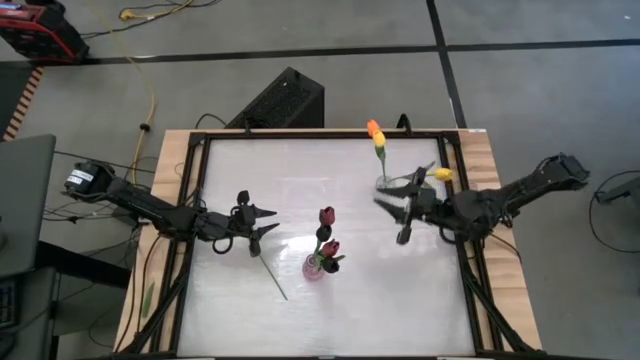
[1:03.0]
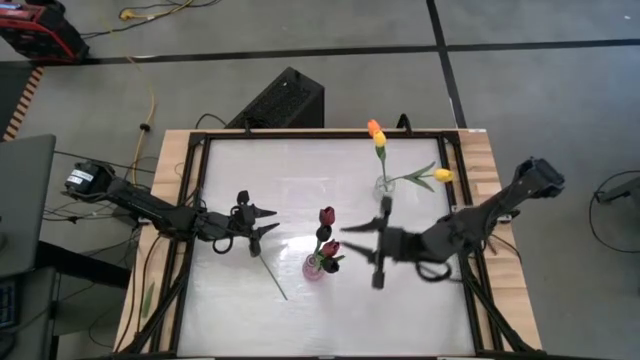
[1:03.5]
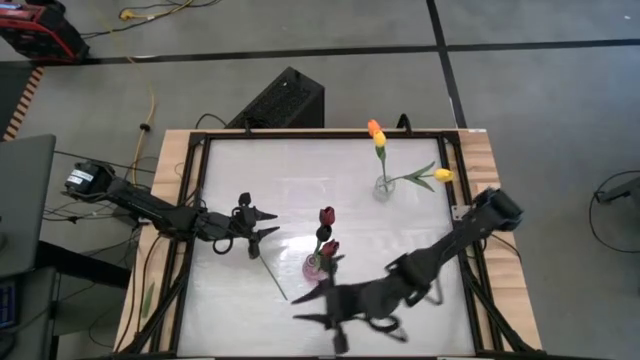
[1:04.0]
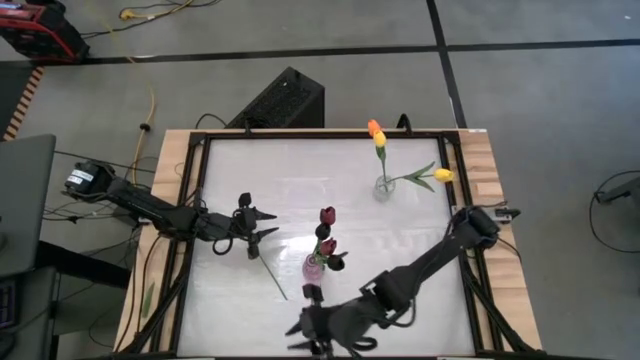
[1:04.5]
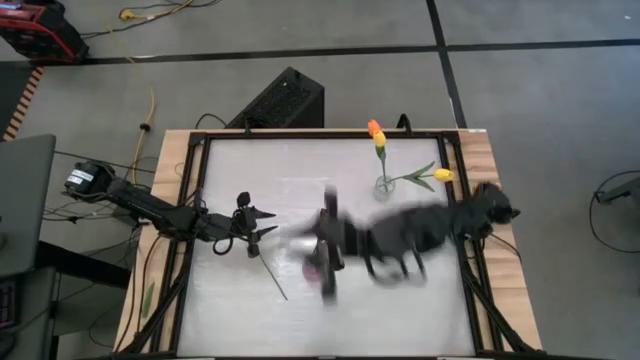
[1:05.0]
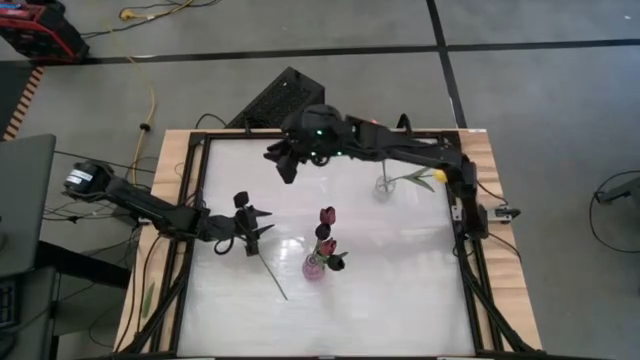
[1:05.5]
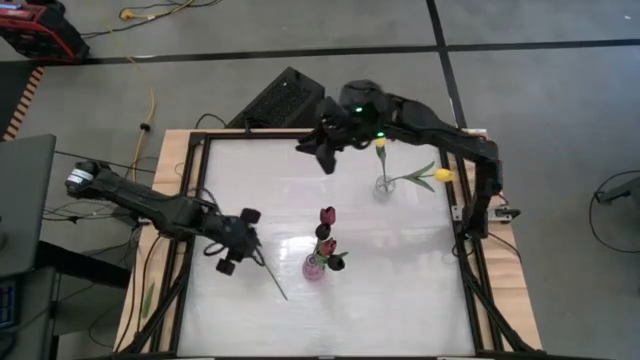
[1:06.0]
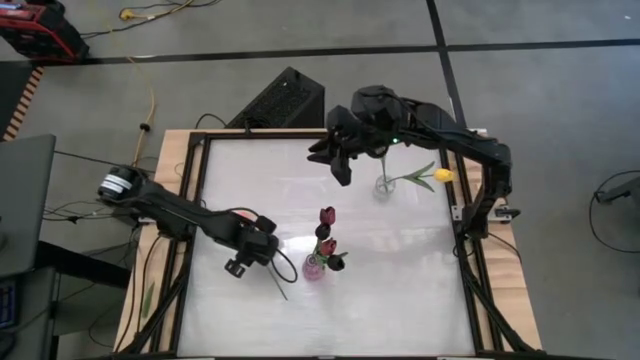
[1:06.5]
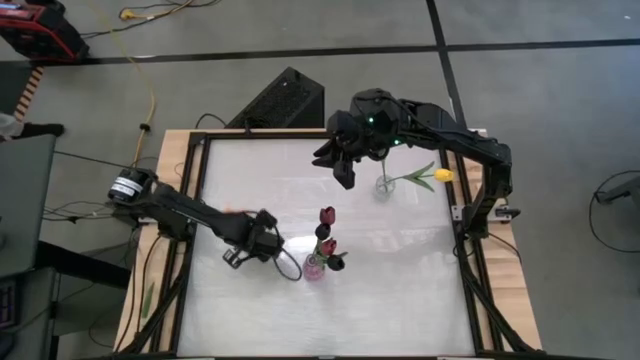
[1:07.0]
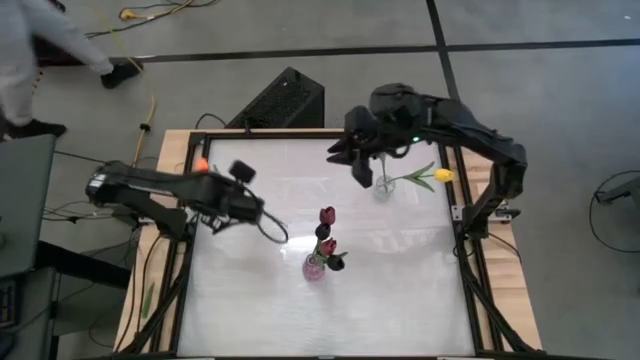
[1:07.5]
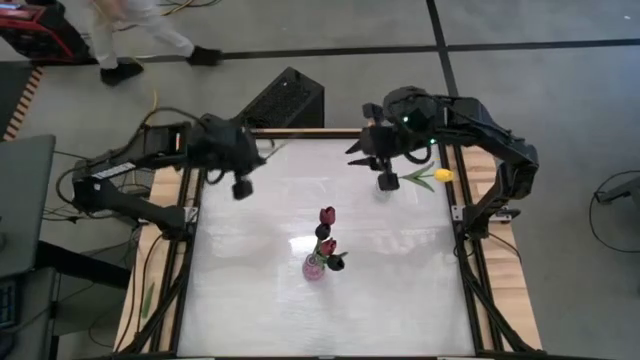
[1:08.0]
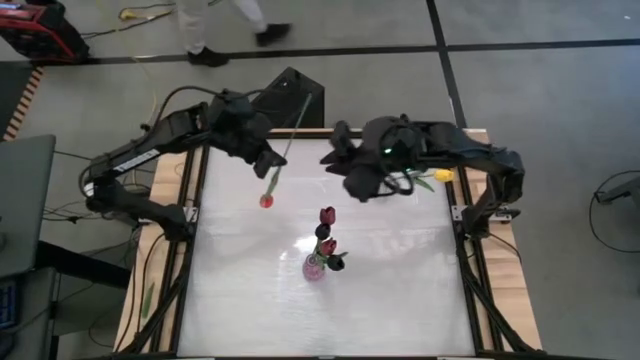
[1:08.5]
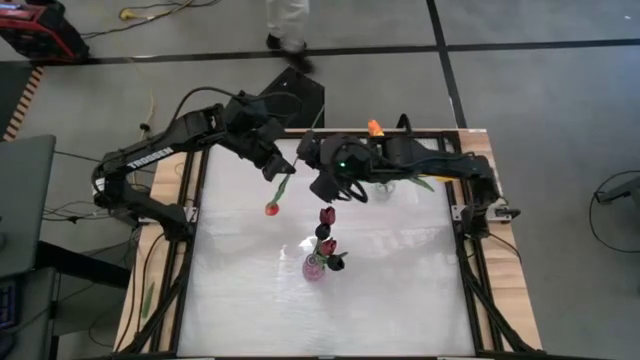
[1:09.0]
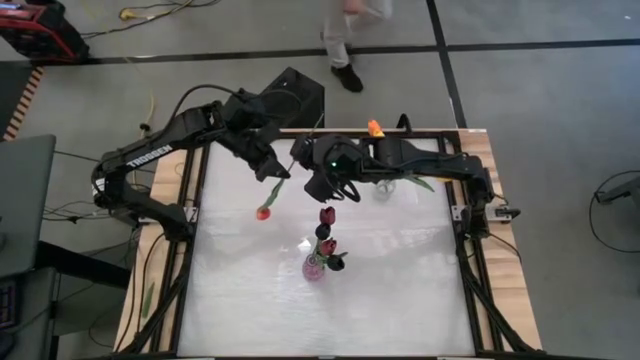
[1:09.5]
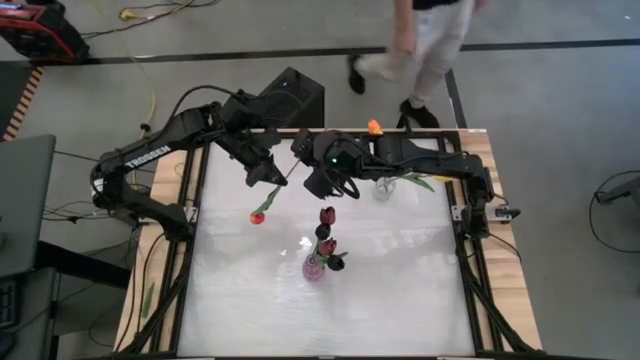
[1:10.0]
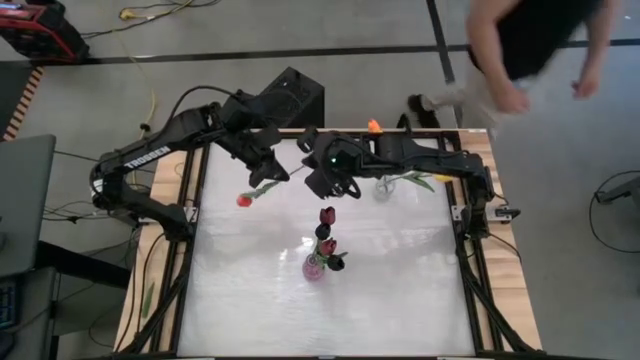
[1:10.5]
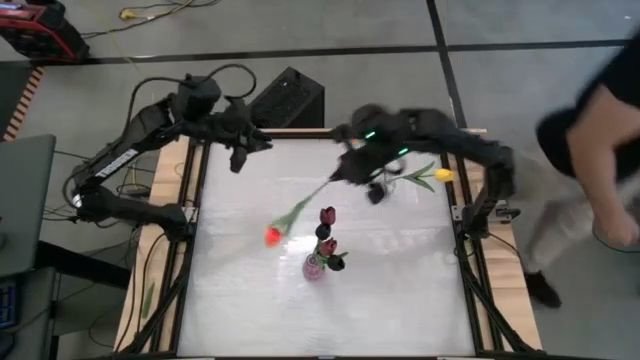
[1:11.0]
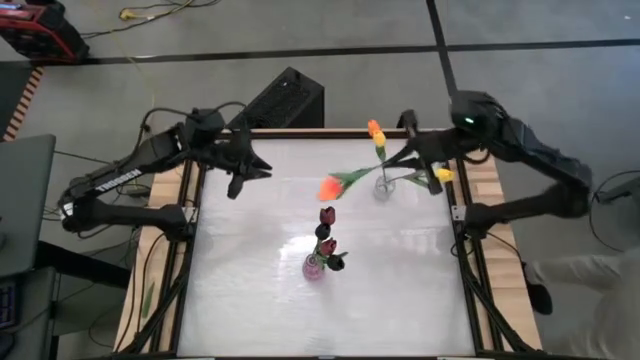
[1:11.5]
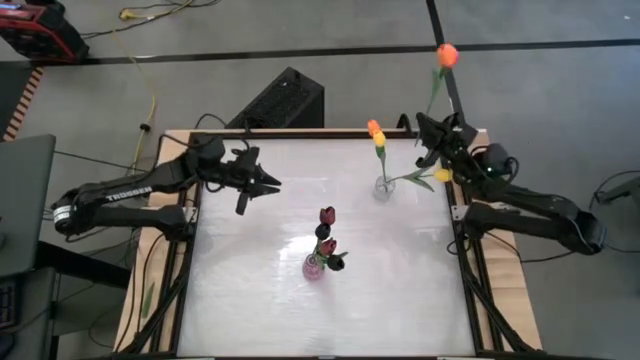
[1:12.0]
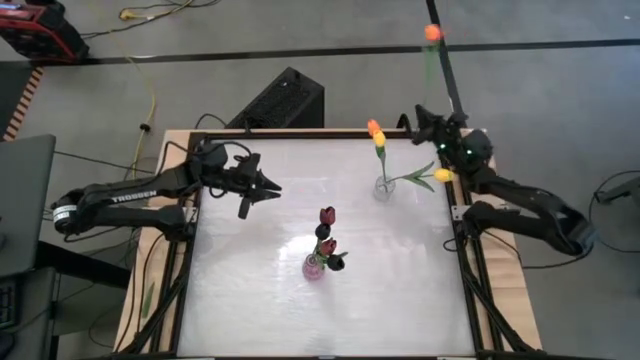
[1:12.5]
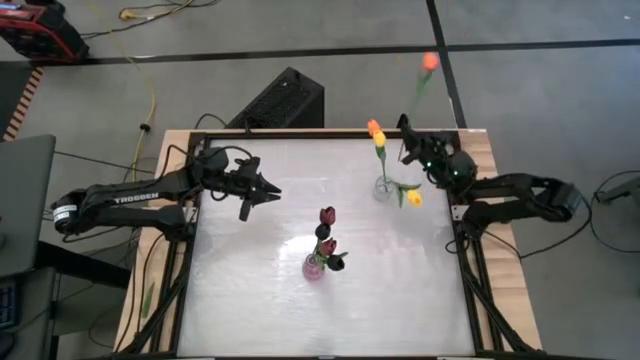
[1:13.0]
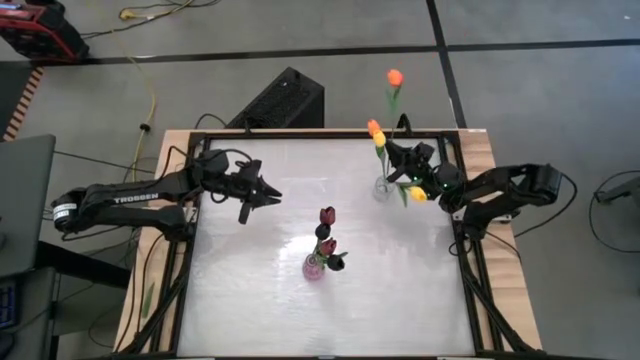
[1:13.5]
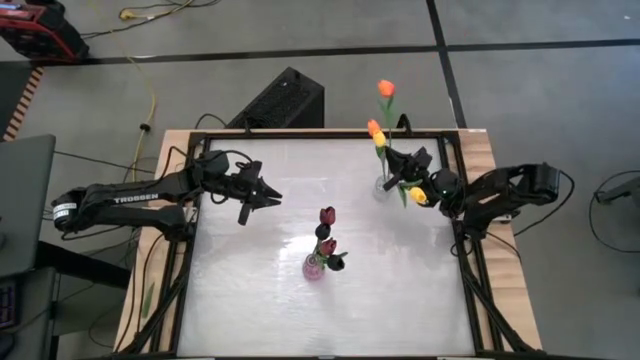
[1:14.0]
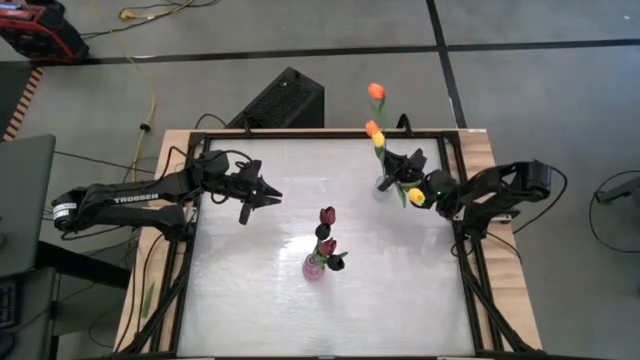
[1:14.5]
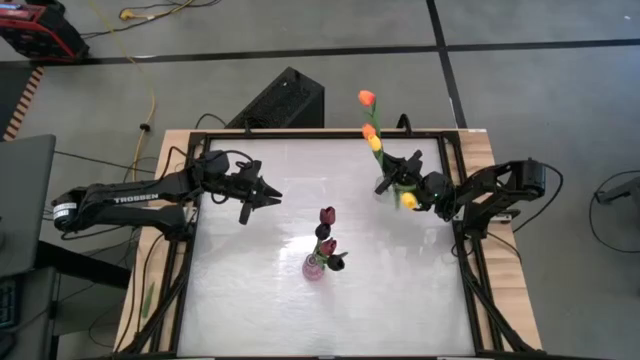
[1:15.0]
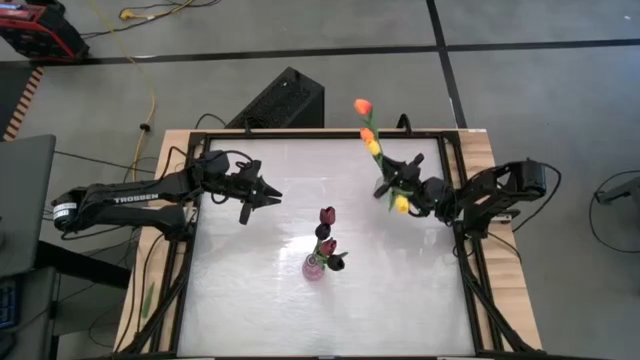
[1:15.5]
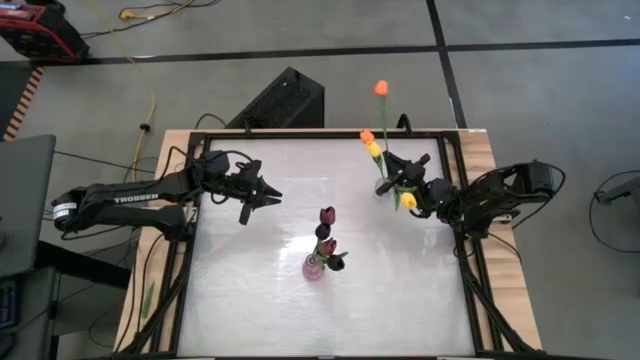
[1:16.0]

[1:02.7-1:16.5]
Task: Sort flowers into vase by color
Put the orange flower into the transparent vase

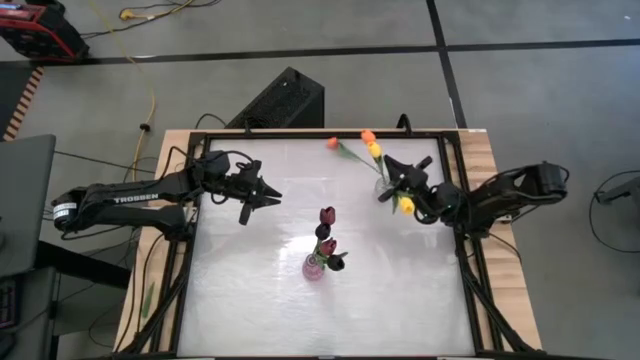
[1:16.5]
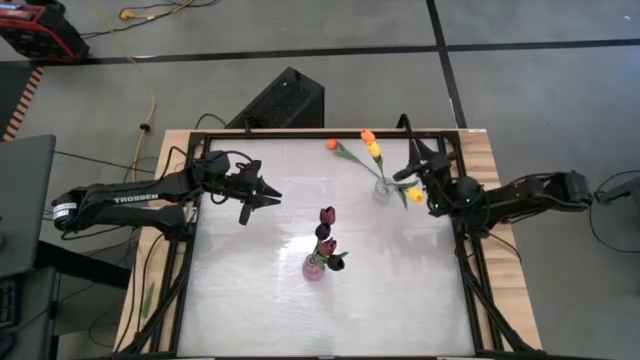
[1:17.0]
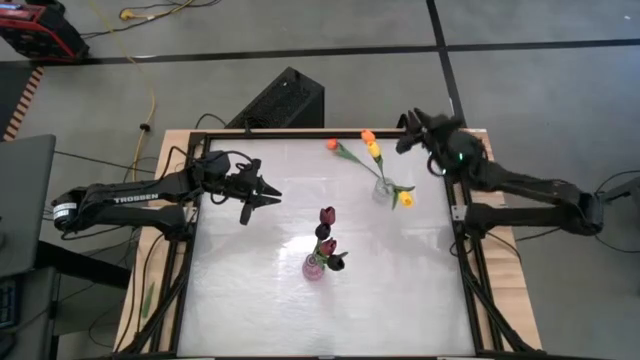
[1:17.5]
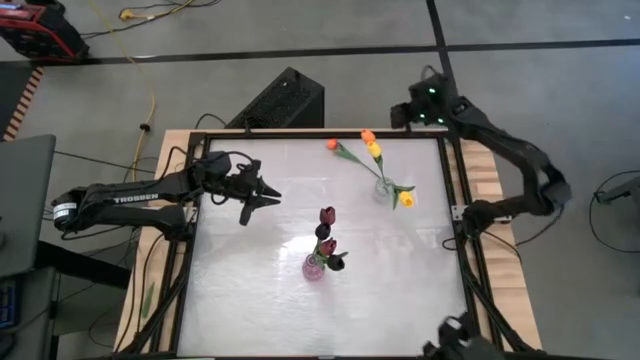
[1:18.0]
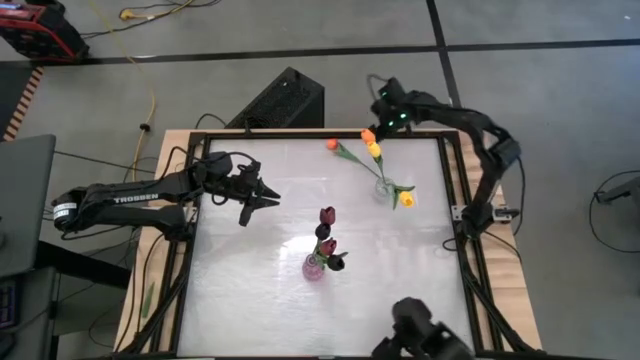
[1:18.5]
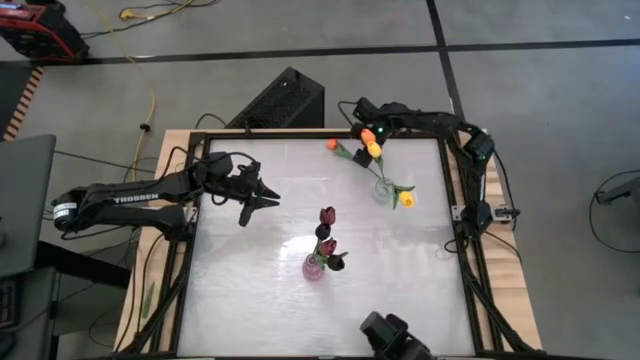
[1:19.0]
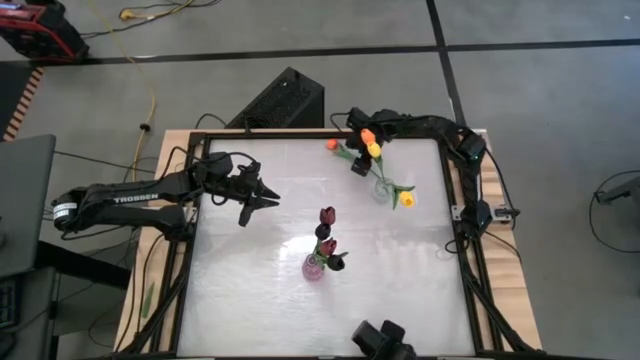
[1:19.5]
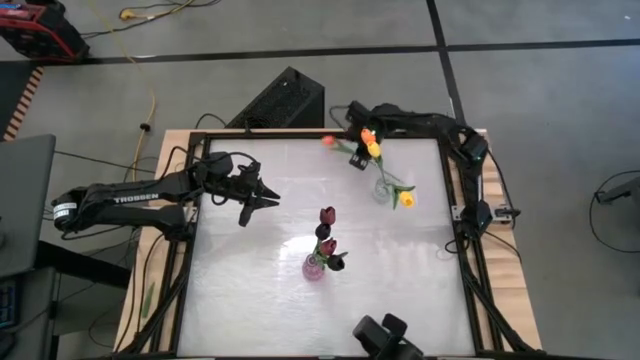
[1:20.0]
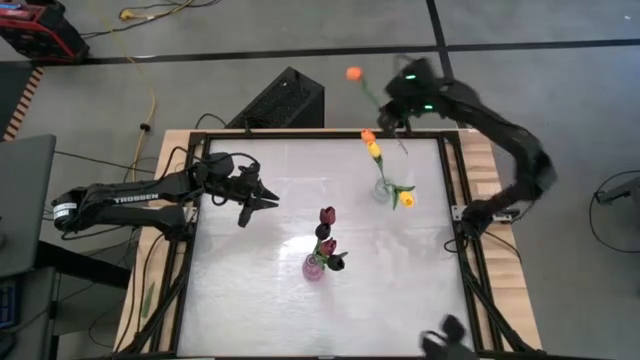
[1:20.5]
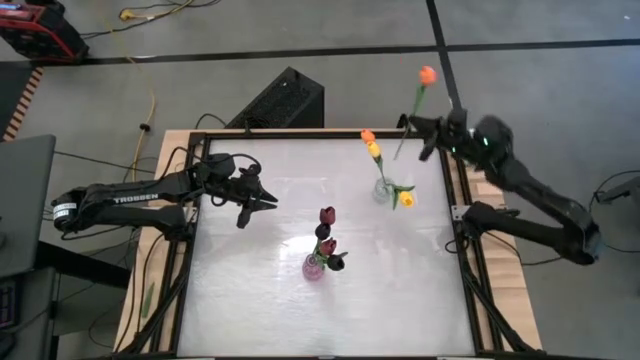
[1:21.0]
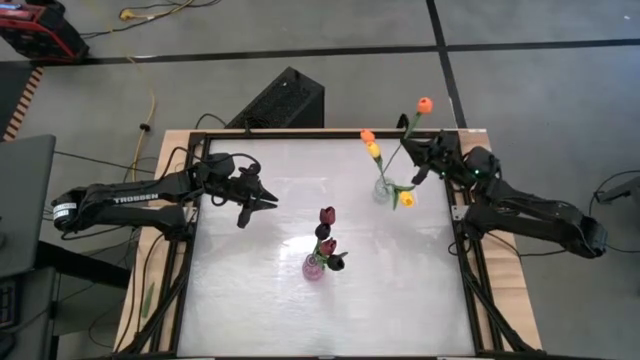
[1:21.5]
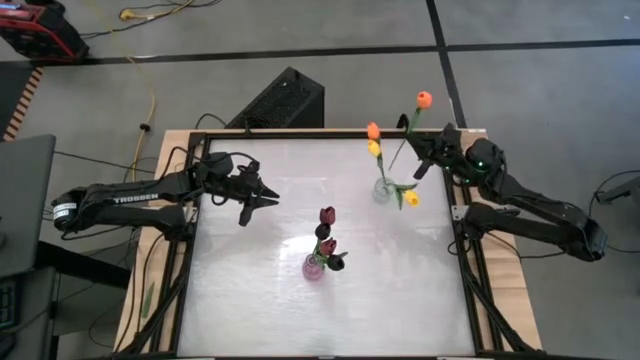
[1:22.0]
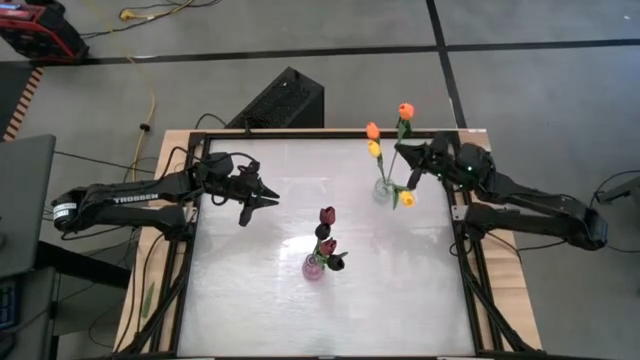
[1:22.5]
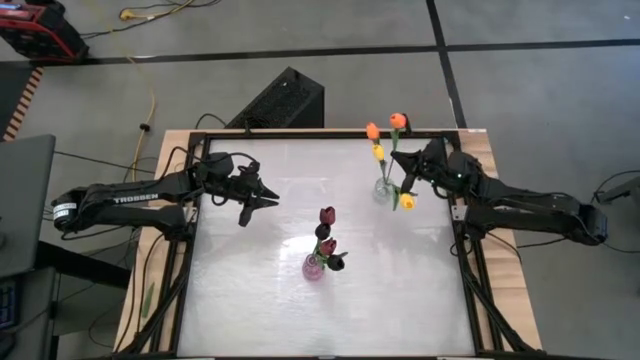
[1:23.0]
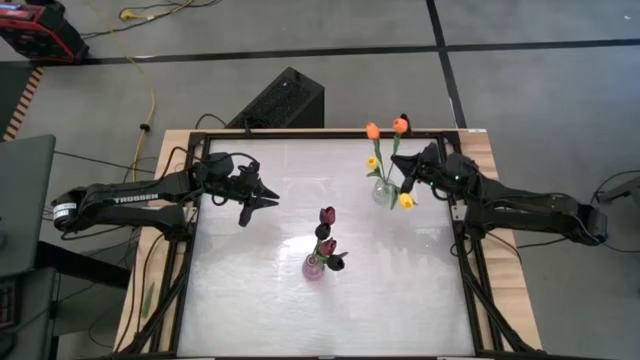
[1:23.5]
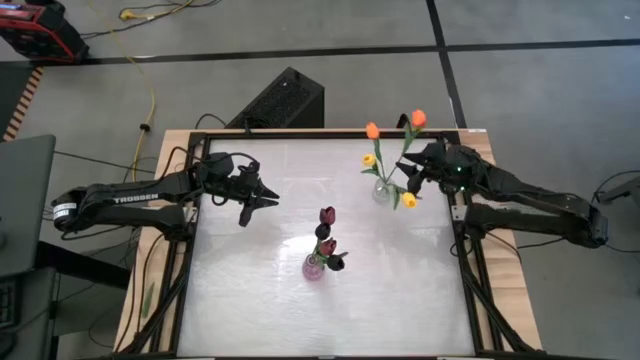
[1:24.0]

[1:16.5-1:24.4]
Put the orange flower into the transparent vase
